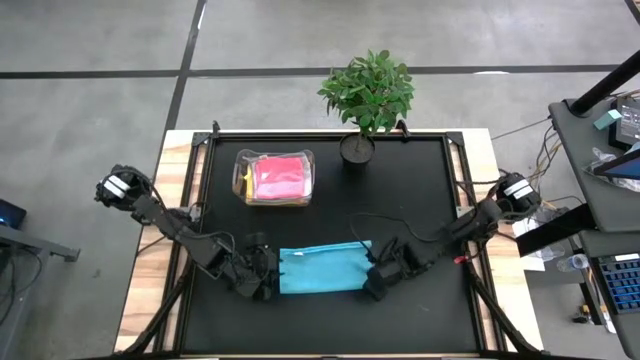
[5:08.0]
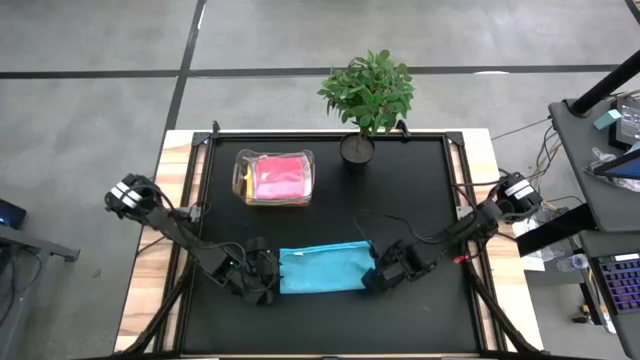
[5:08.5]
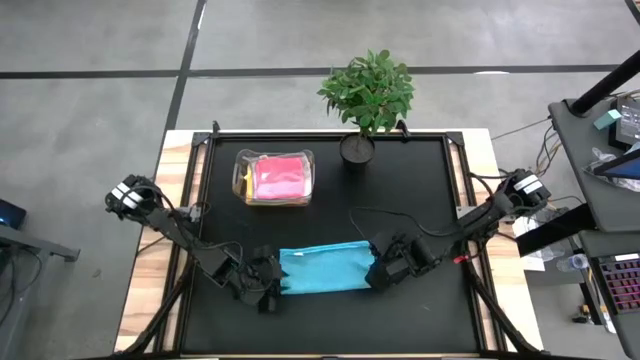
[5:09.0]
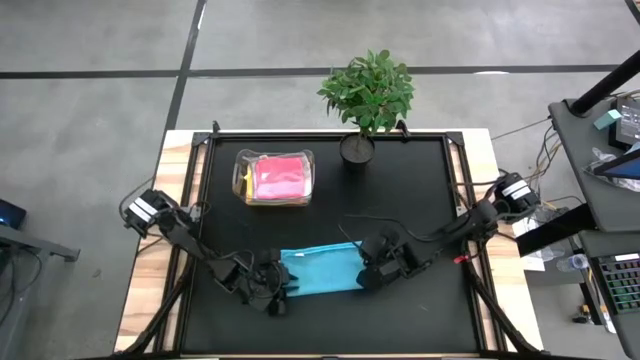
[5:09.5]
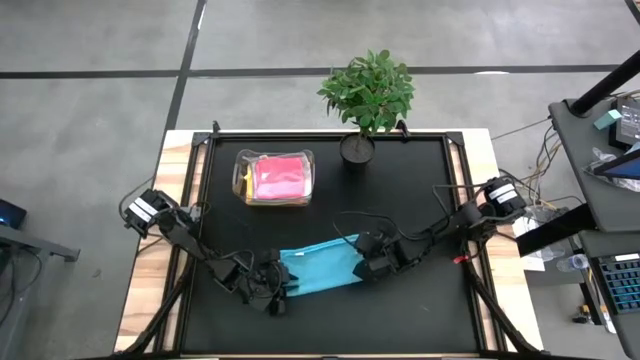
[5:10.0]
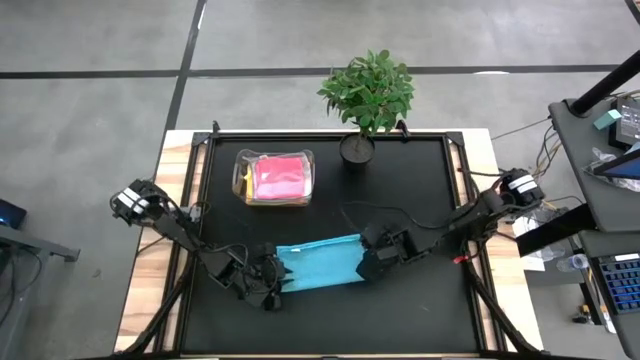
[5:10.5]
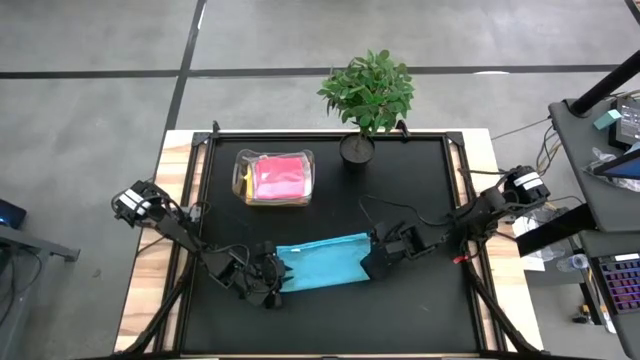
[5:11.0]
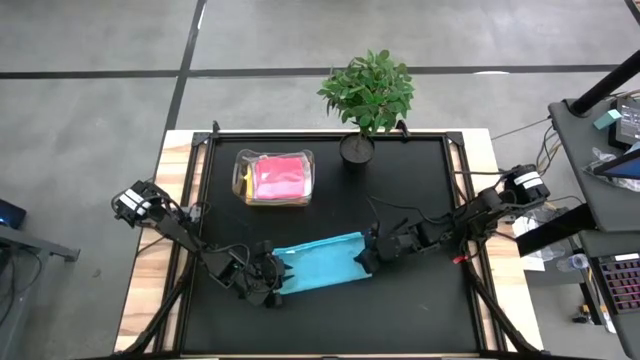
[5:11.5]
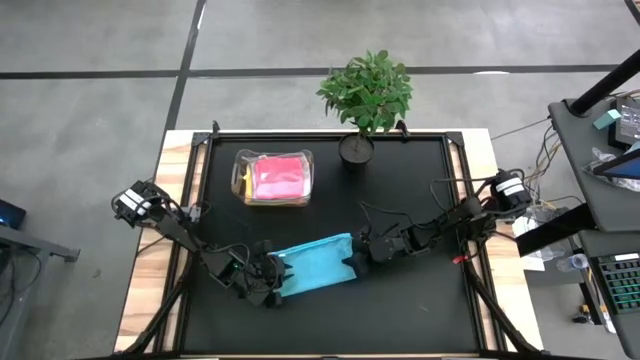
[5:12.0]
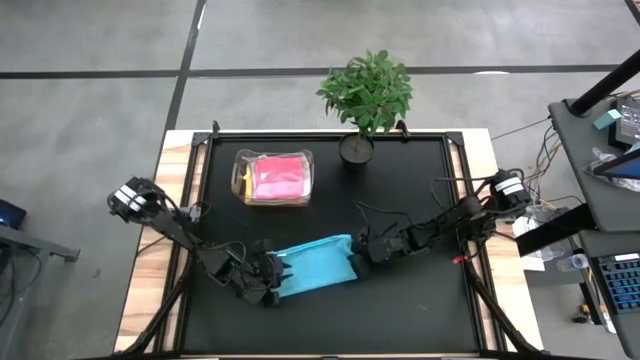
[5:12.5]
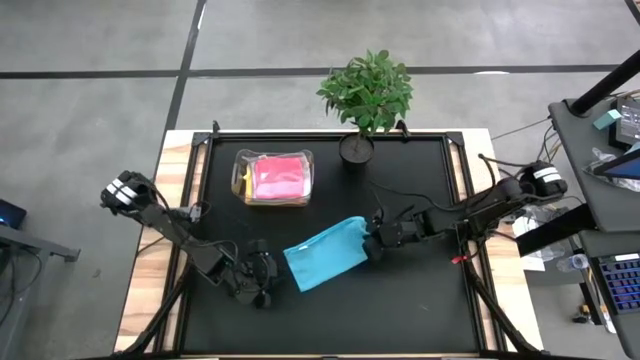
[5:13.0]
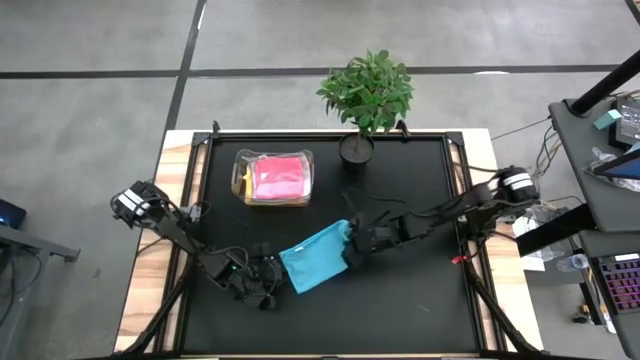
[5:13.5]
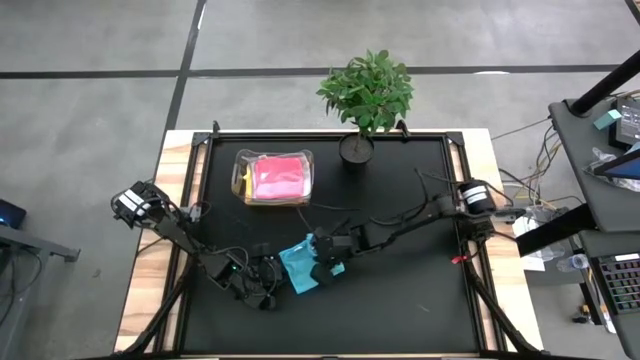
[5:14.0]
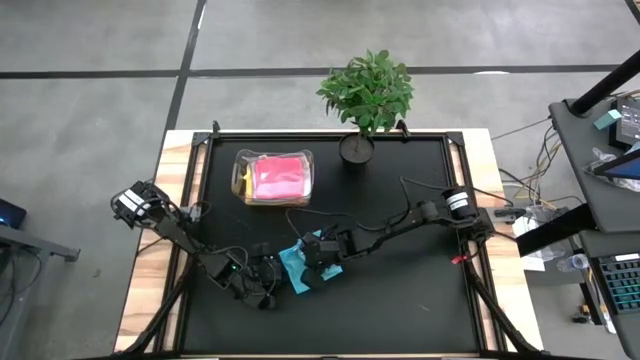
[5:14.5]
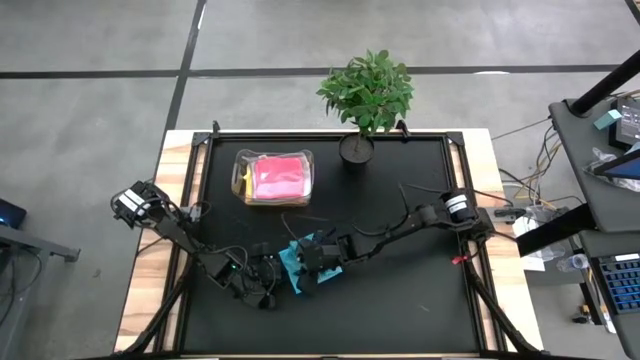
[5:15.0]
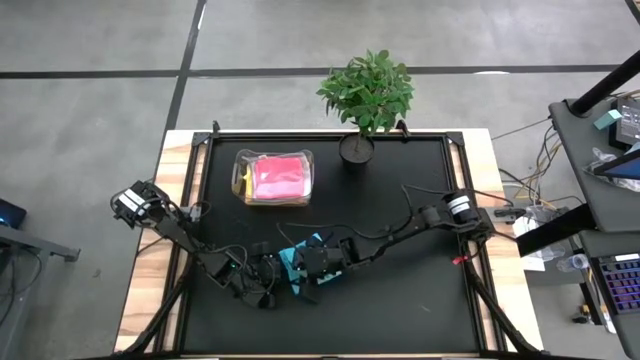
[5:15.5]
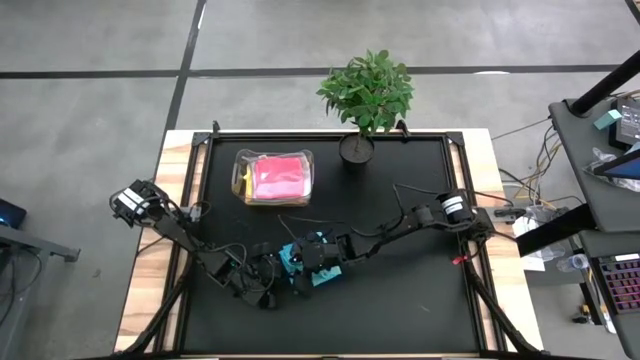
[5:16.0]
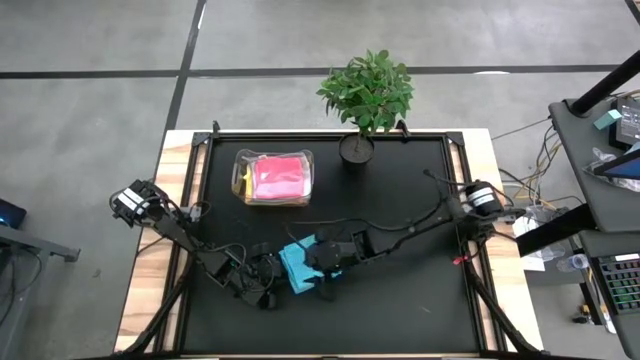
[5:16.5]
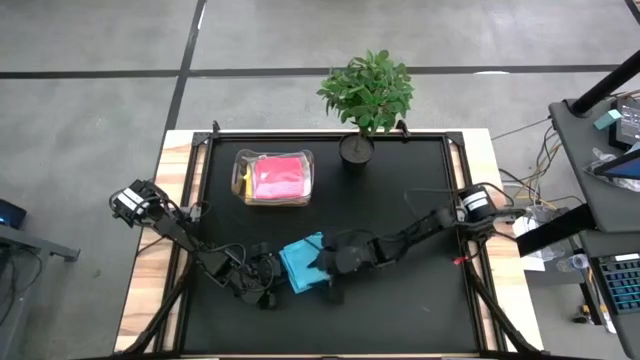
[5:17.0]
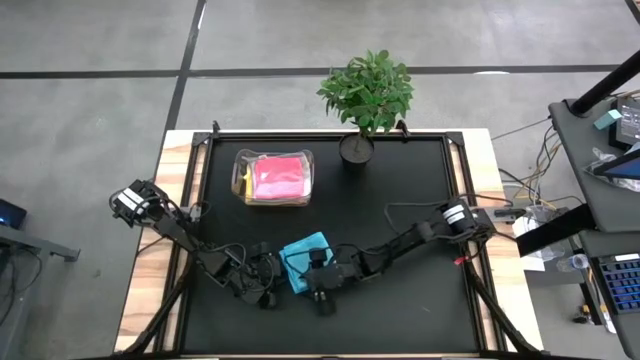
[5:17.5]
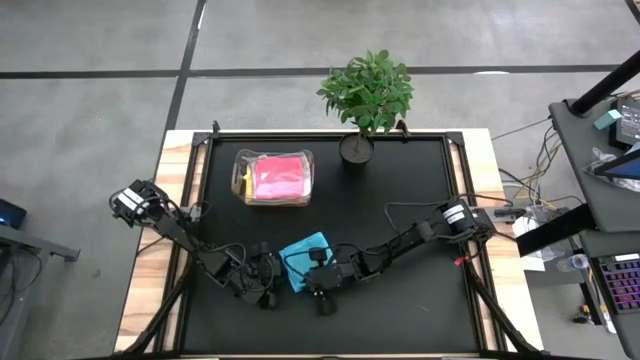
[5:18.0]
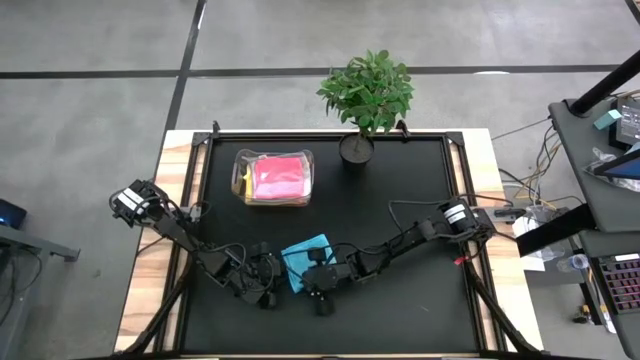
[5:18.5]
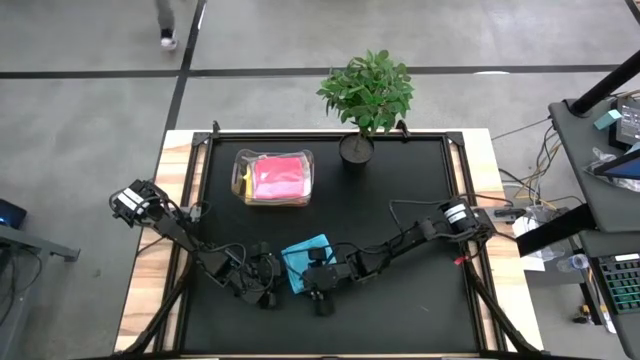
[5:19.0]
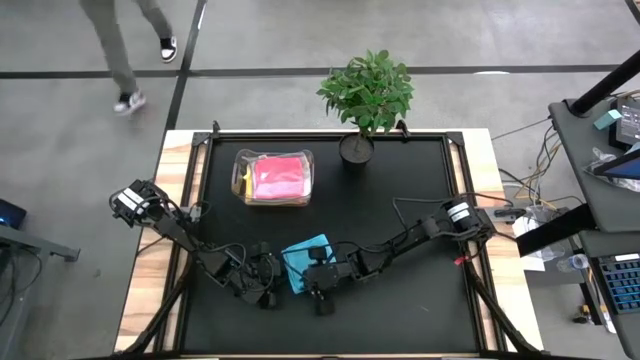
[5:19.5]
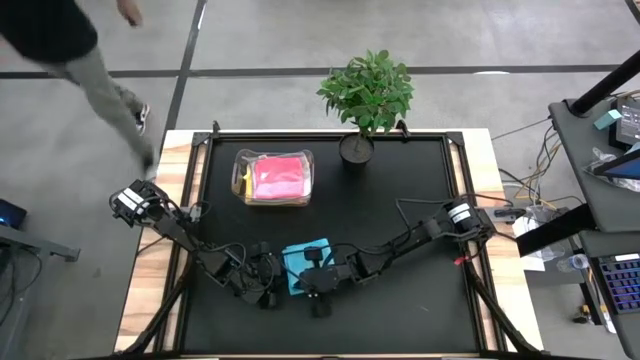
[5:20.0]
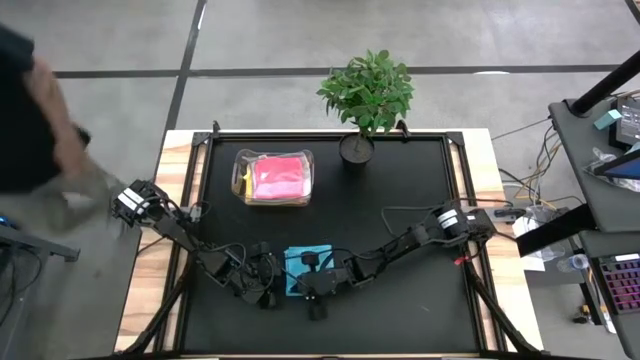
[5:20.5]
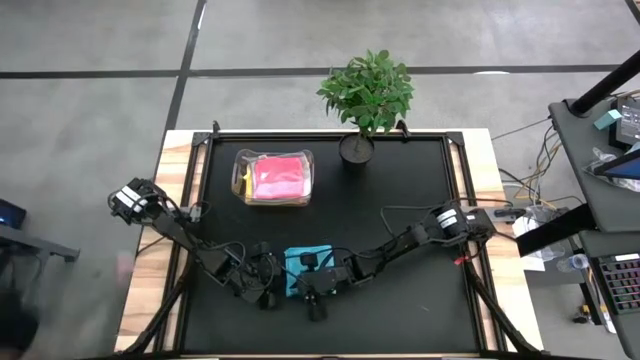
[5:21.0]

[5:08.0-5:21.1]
Task: Fold microfiber towels
Fold the blue towel

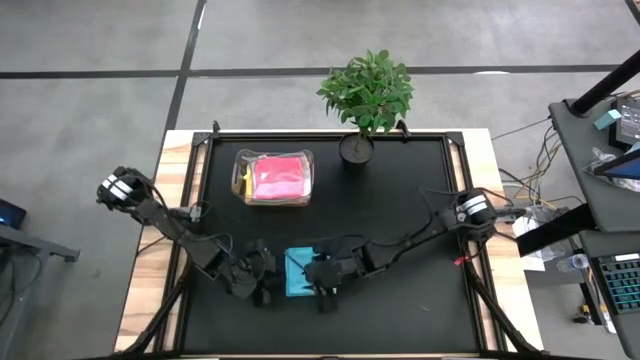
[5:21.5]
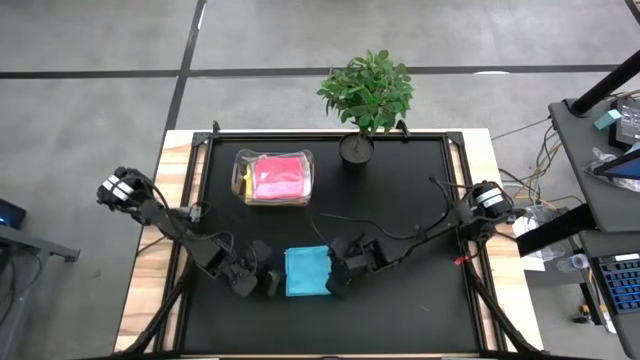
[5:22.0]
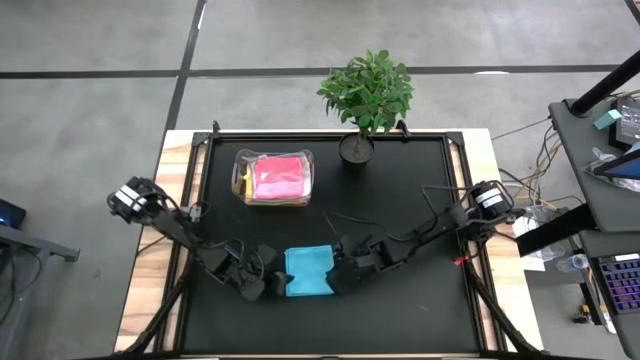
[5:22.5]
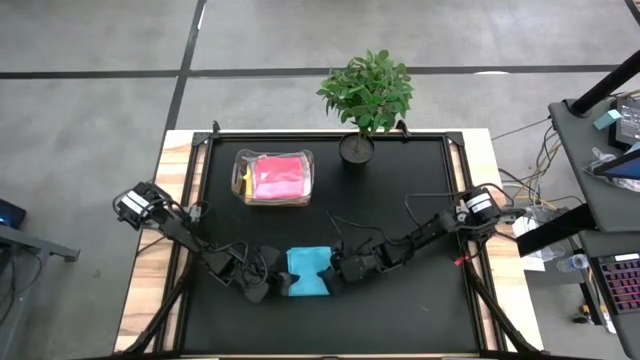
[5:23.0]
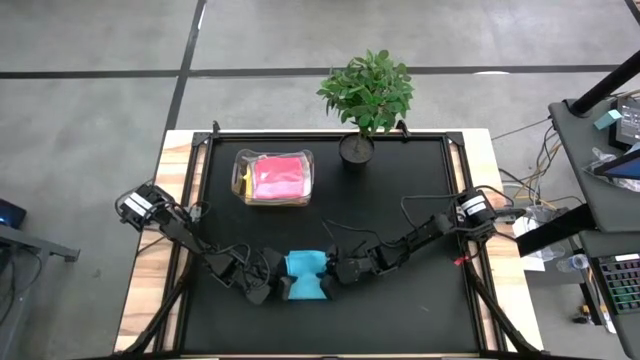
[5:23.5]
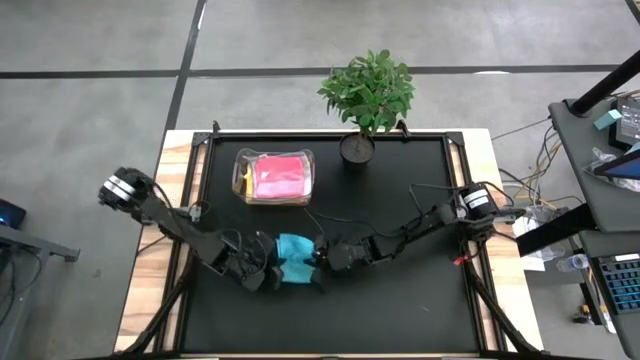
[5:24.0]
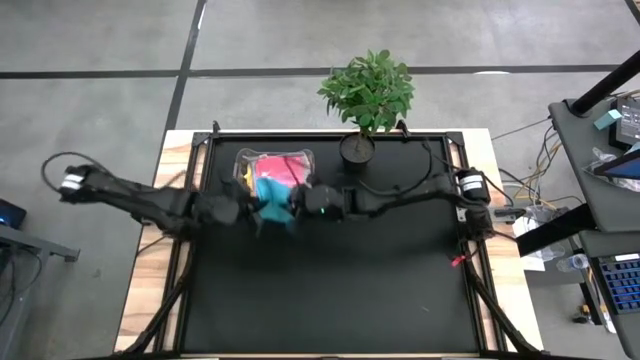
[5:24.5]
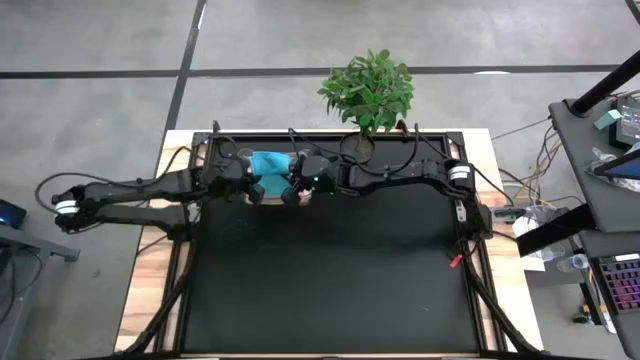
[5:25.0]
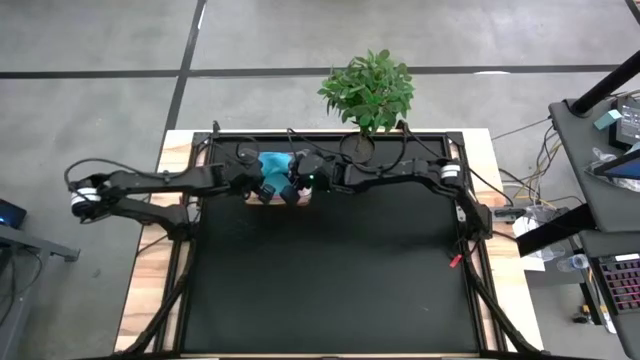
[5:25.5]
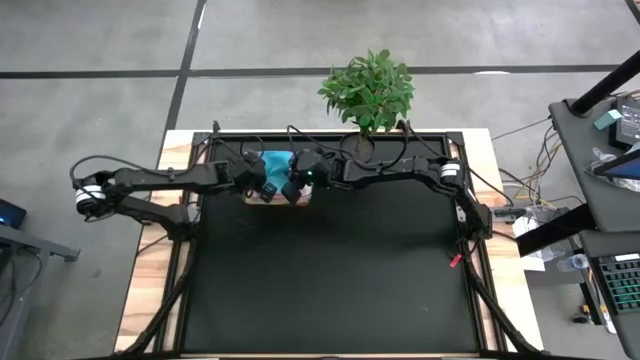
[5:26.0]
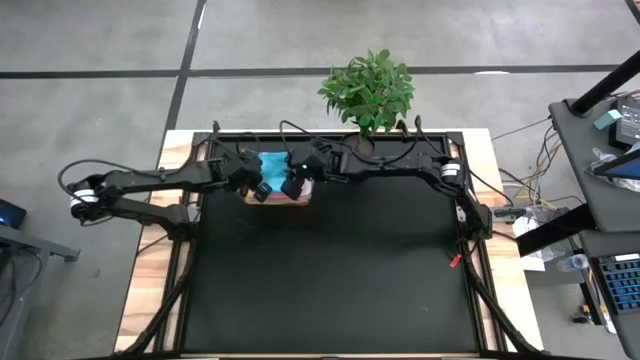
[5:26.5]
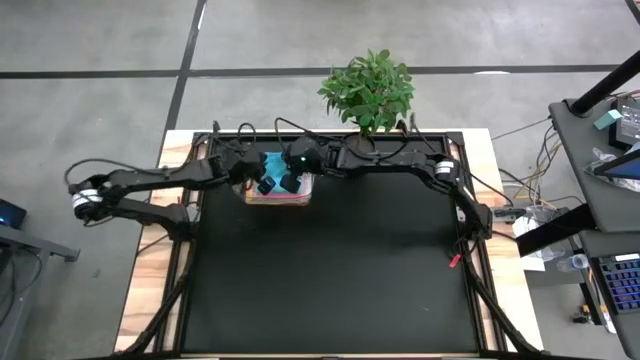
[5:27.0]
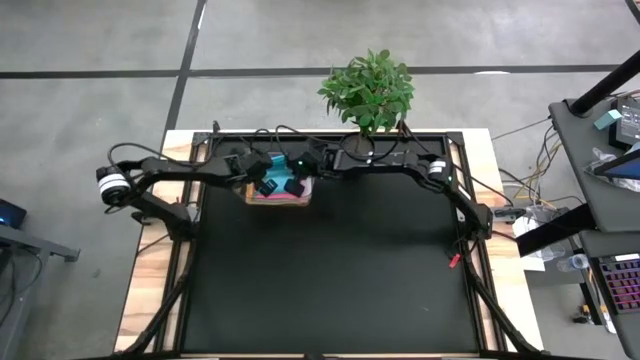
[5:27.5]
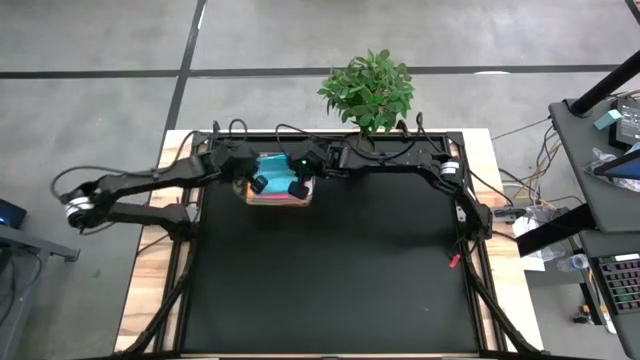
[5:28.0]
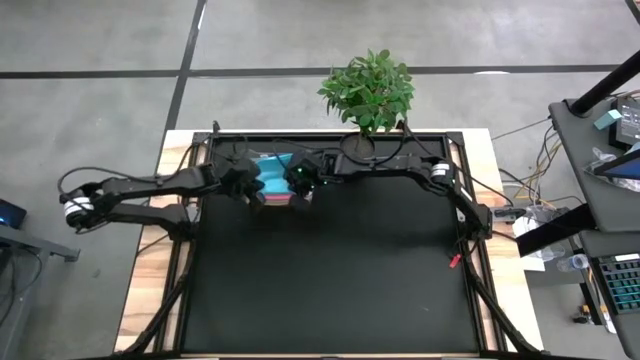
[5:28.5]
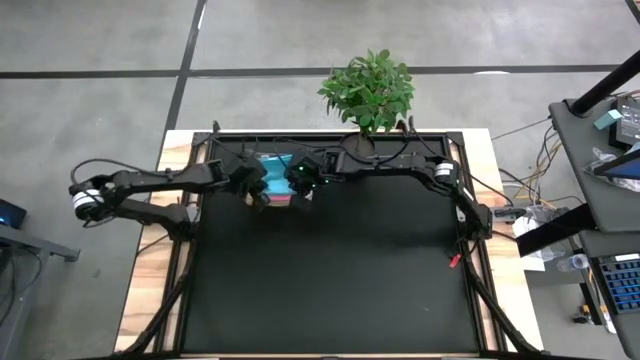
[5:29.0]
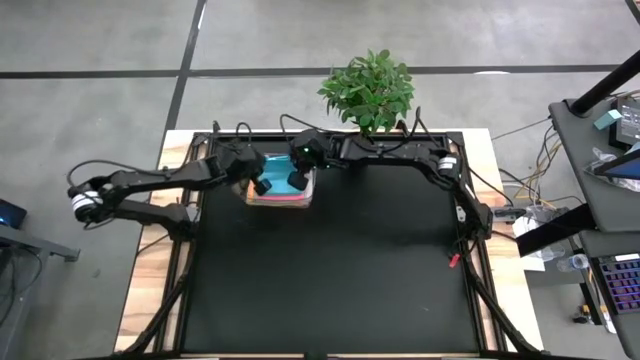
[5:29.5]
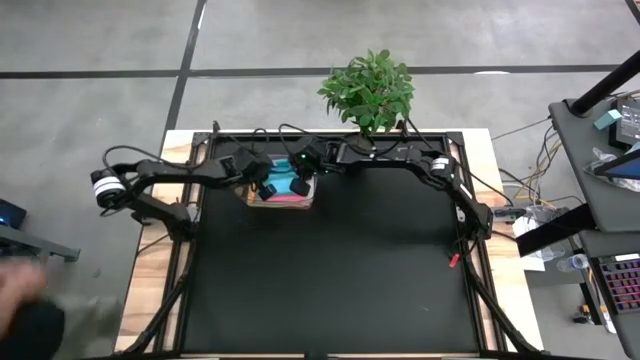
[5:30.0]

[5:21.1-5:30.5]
Put the blue towel into the transparent bin
